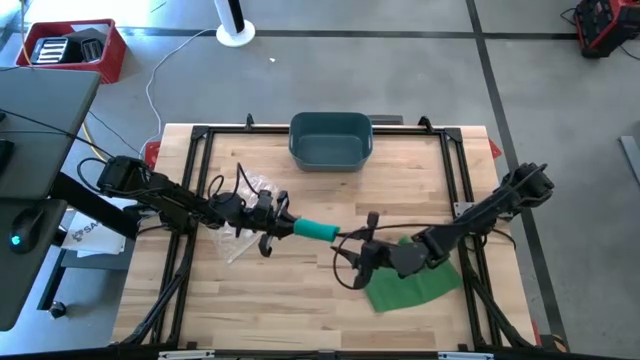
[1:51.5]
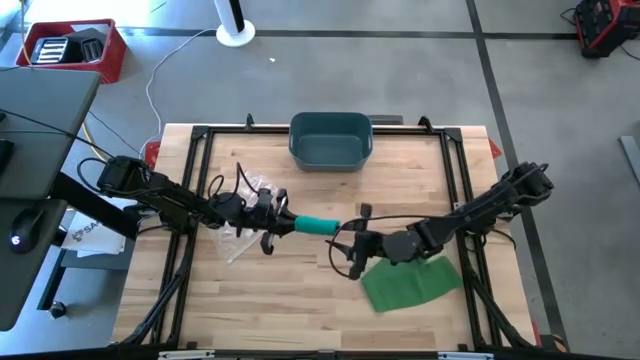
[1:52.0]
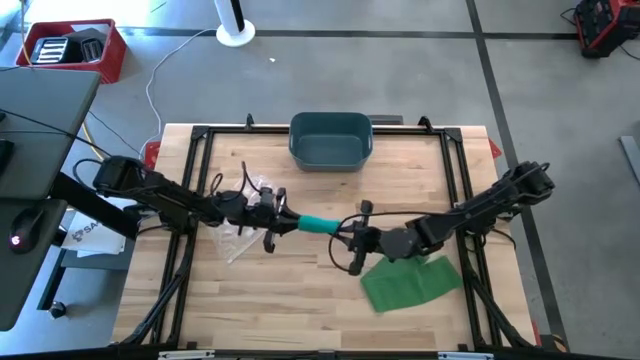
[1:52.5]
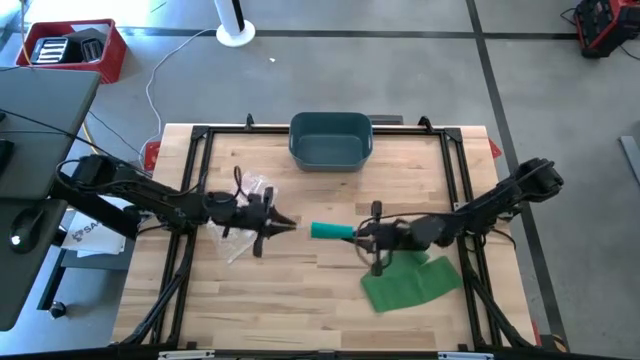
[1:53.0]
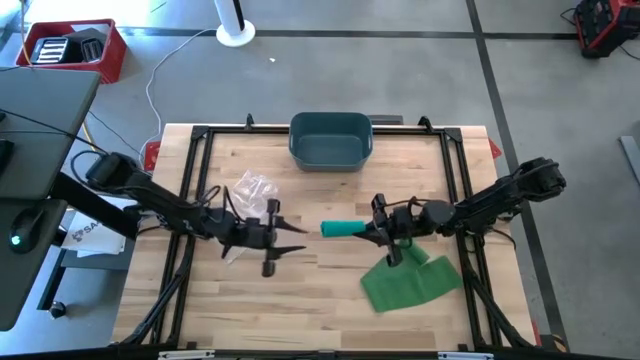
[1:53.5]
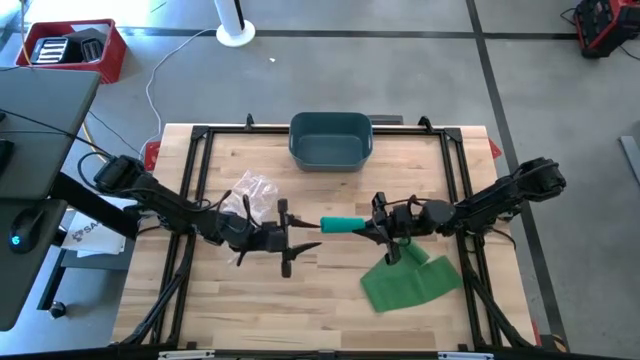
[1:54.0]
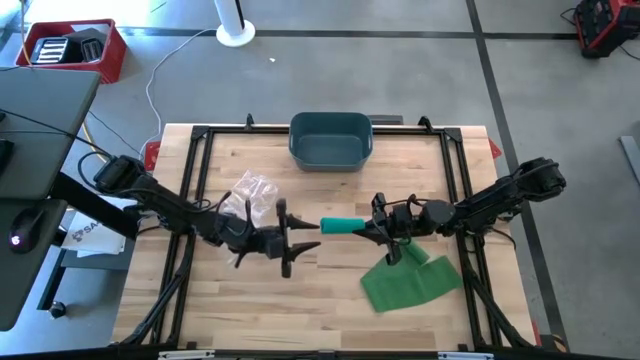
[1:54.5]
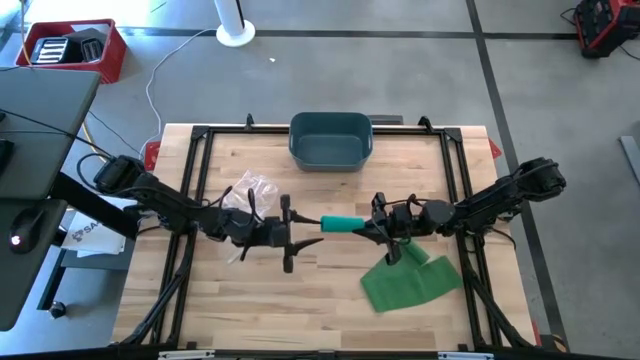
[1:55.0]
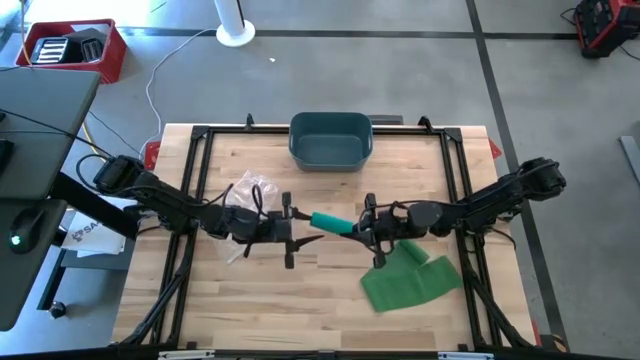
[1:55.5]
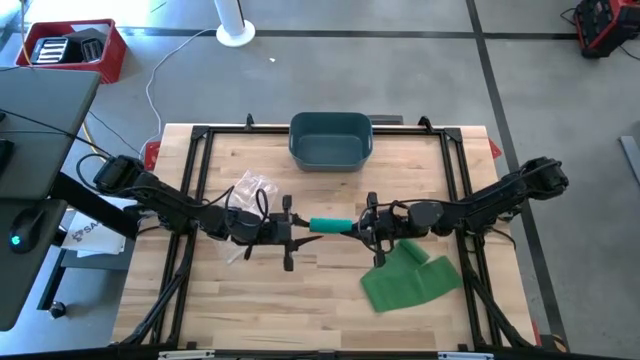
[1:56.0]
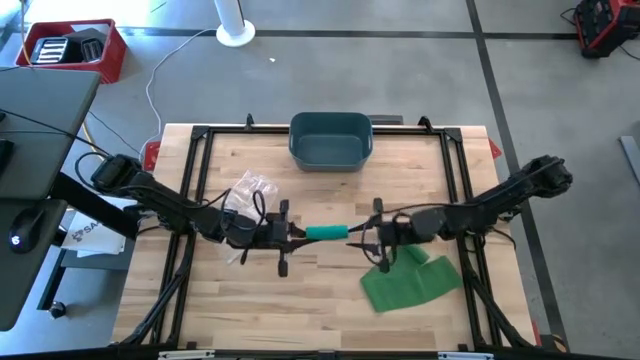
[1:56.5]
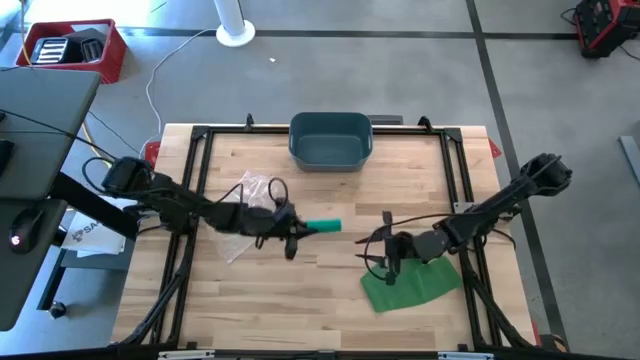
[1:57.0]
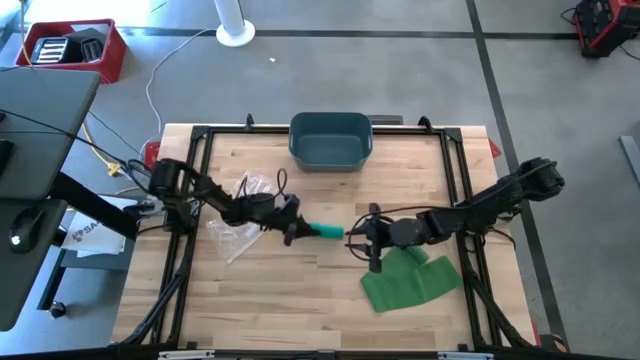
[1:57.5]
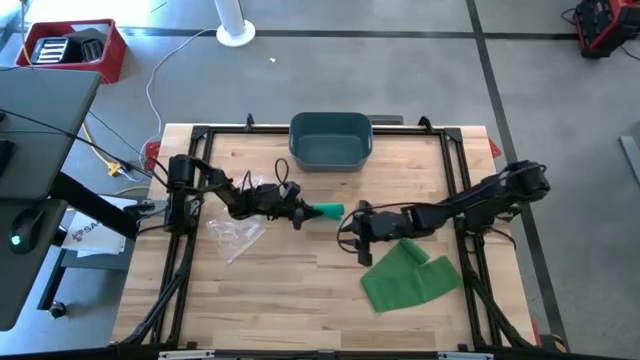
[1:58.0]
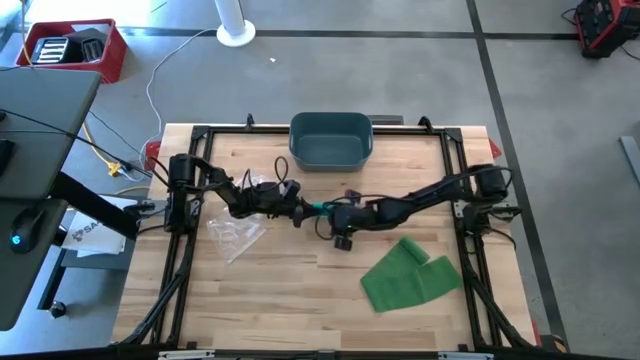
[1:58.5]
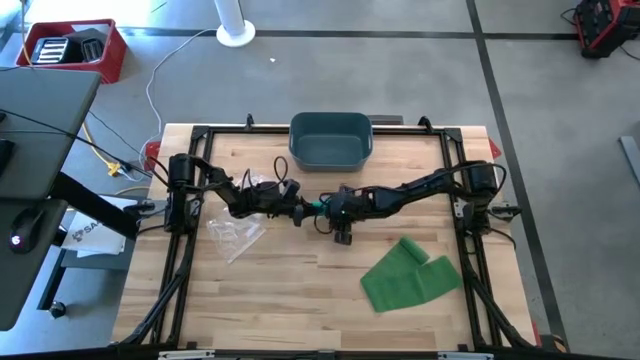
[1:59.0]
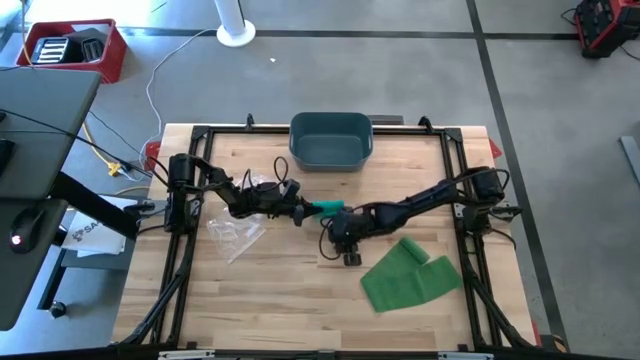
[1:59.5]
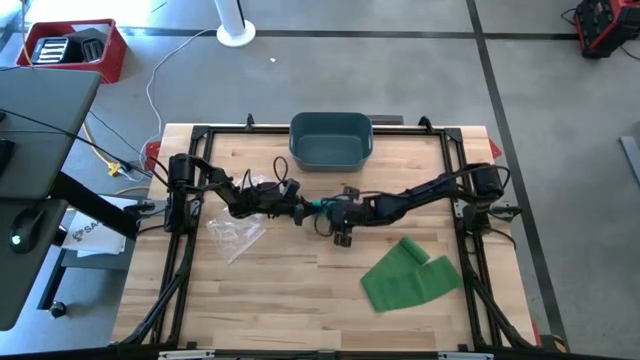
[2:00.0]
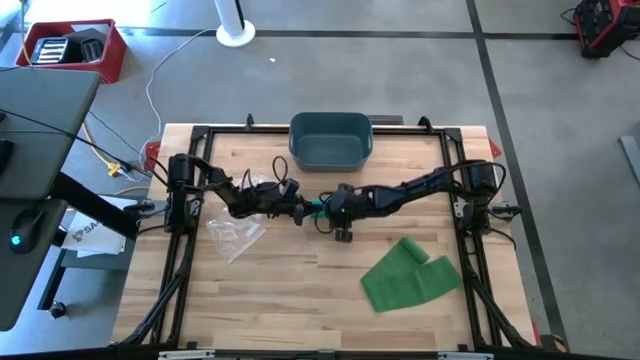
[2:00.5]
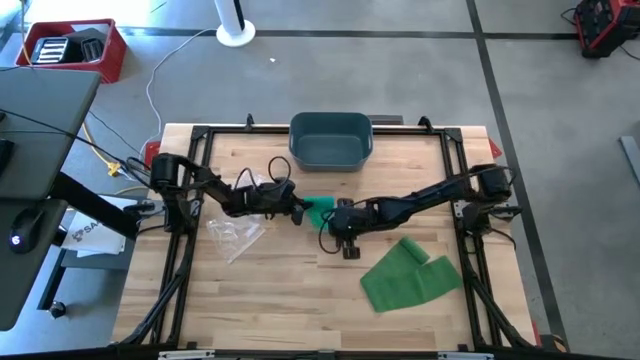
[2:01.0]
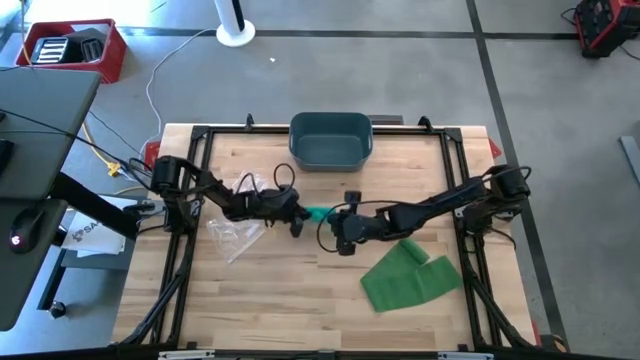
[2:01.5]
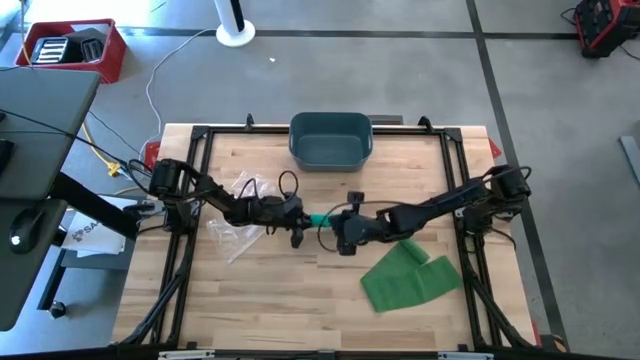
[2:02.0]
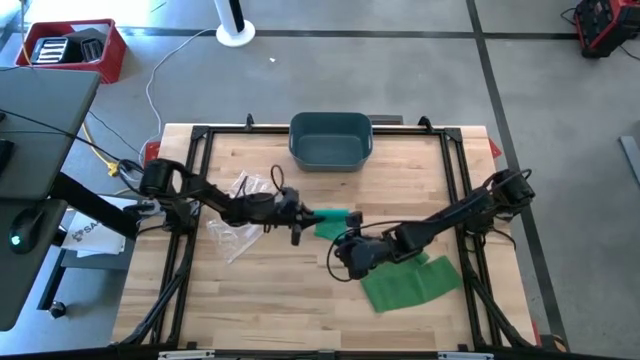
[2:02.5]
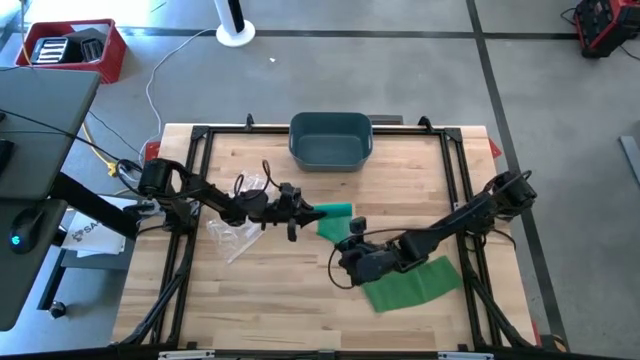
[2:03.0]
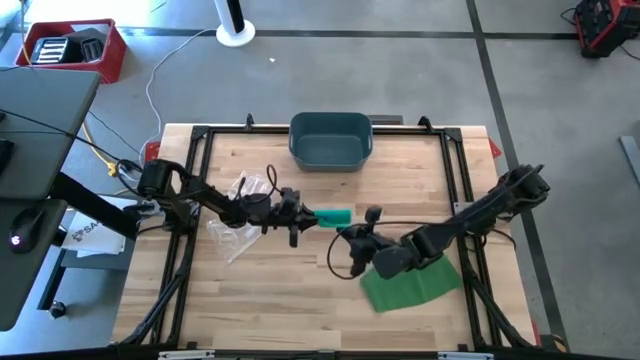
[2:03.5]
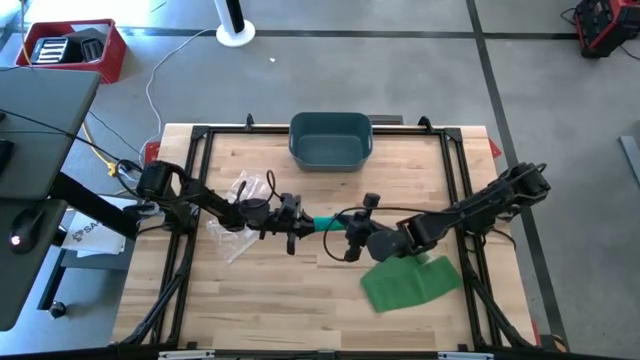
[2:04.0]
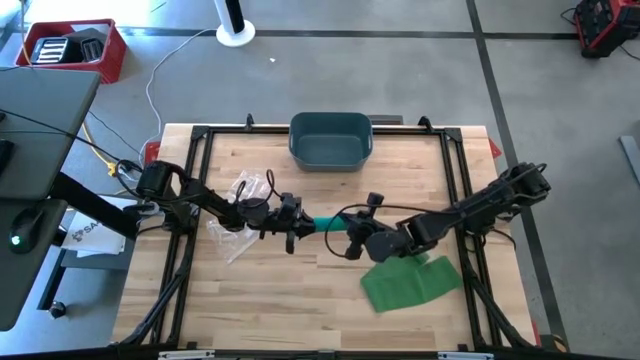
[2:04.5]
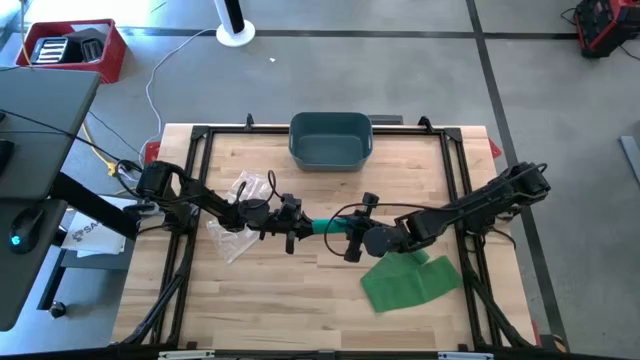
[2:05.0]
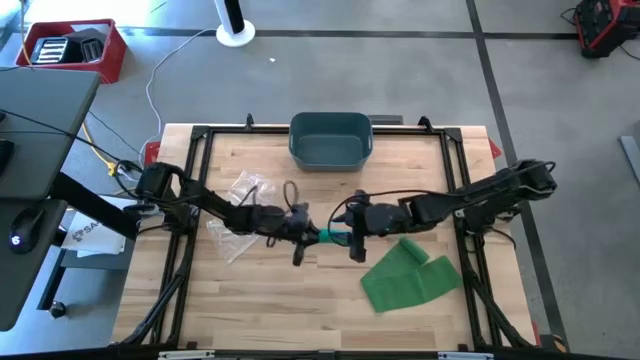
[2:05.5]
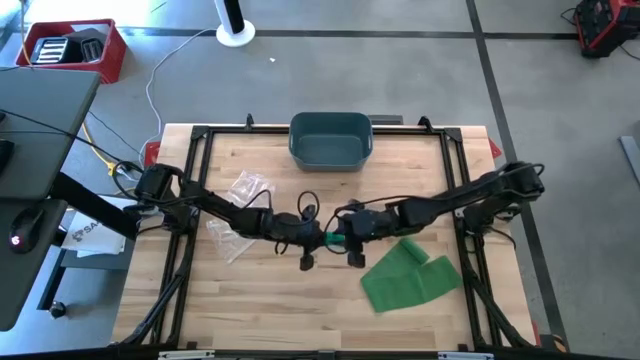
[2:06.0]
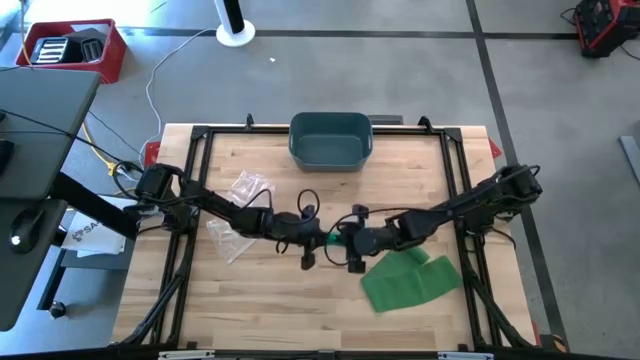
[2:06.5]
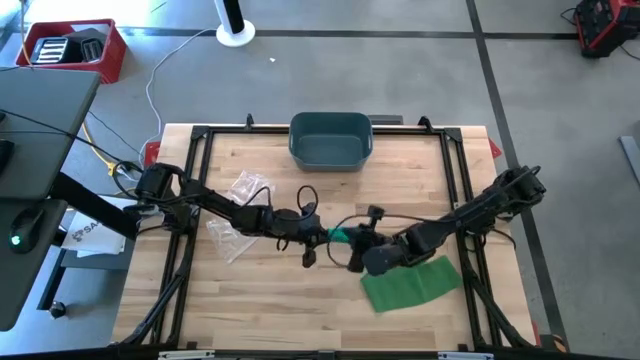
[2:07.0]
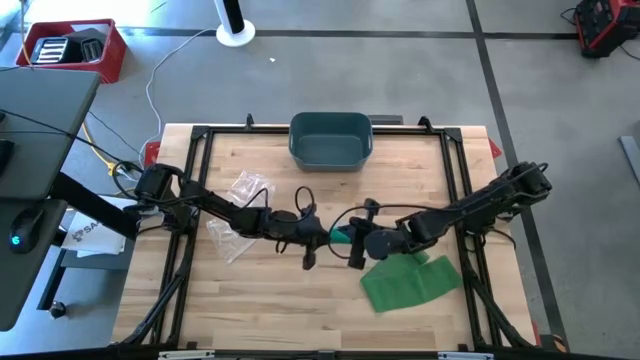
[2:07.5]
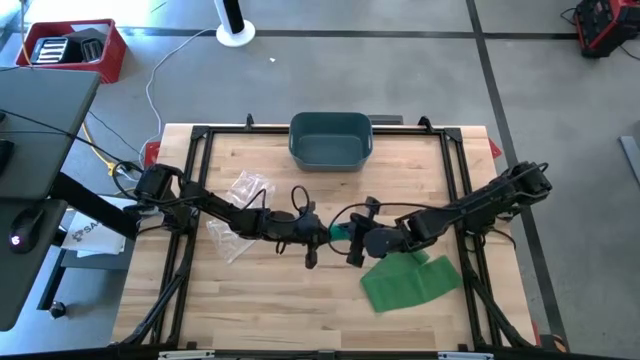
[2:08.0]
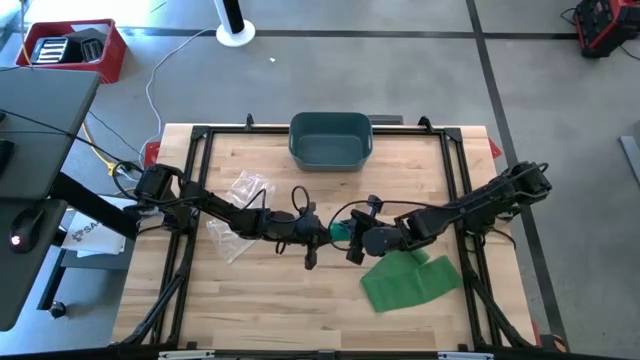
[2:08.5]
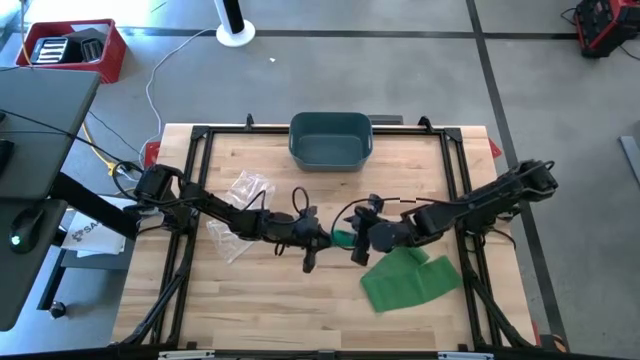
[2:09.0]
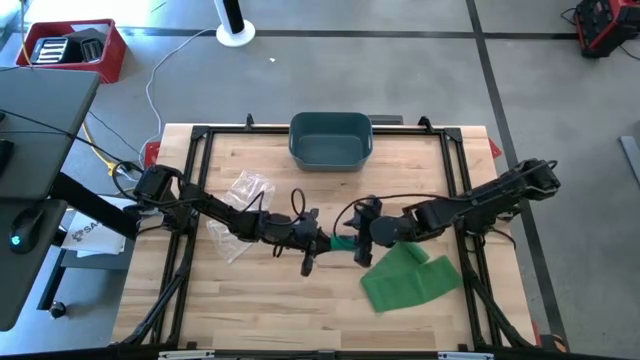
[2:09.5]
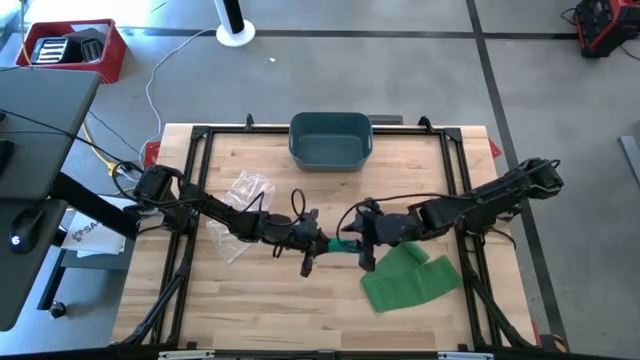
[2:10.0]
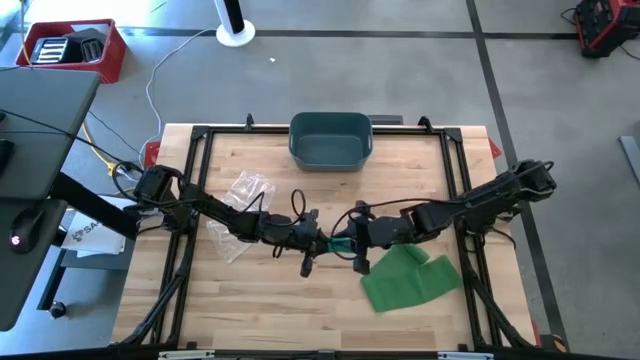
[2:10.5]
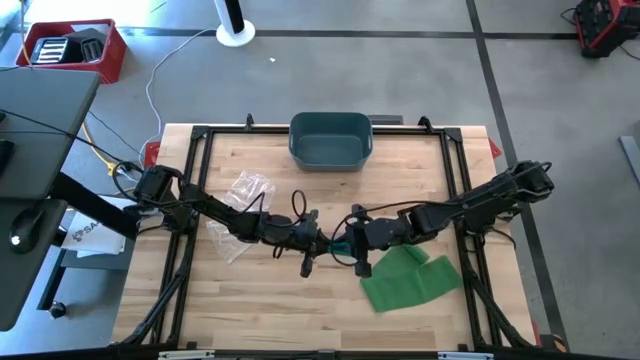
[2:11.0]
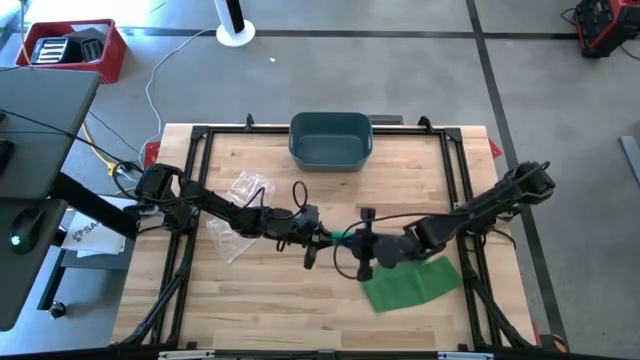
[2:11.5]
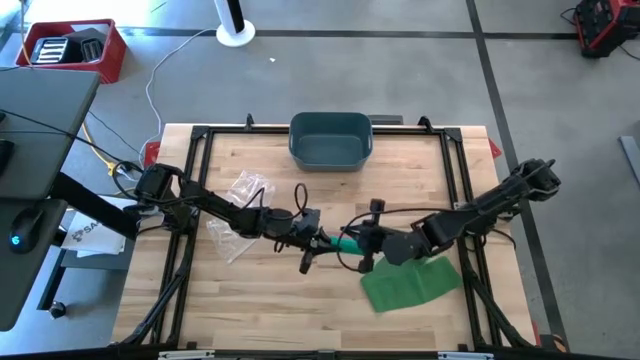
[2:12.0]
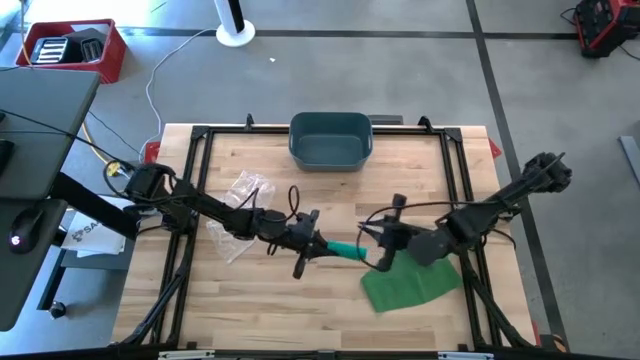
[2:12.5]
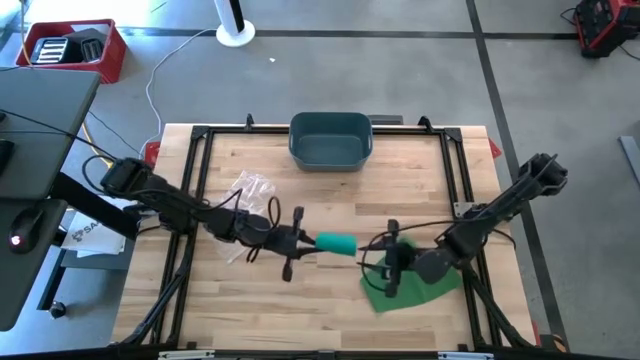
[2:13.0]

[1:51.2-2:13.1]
Task: Roll bandage
Roll the blue bandage
